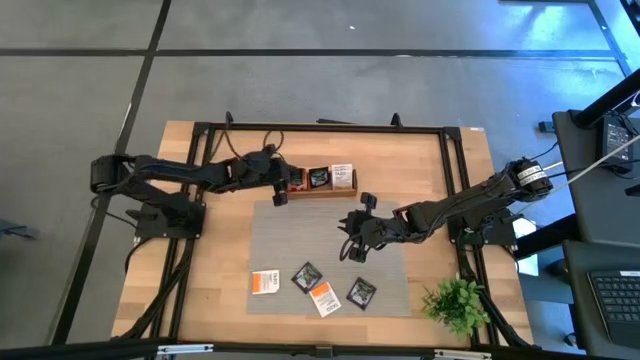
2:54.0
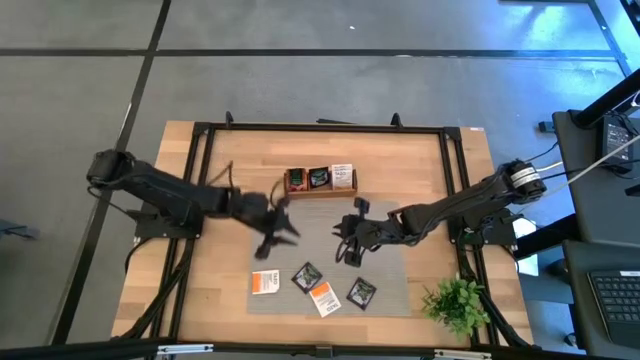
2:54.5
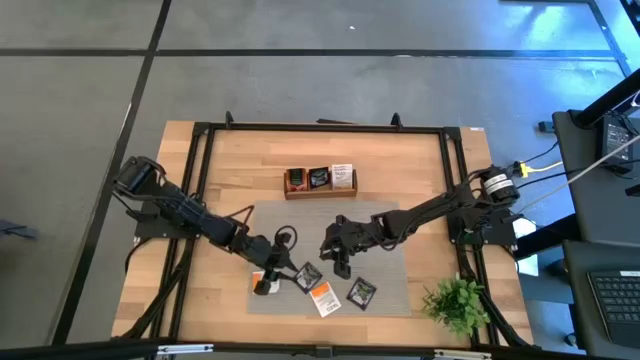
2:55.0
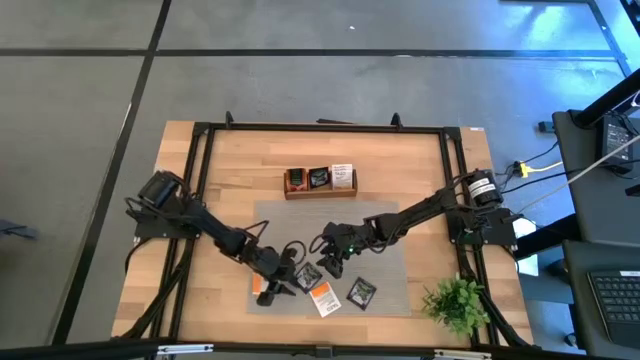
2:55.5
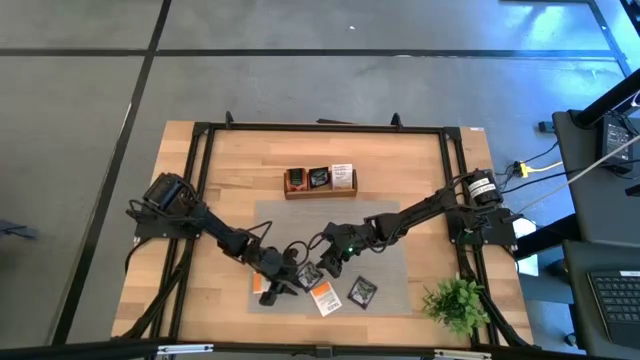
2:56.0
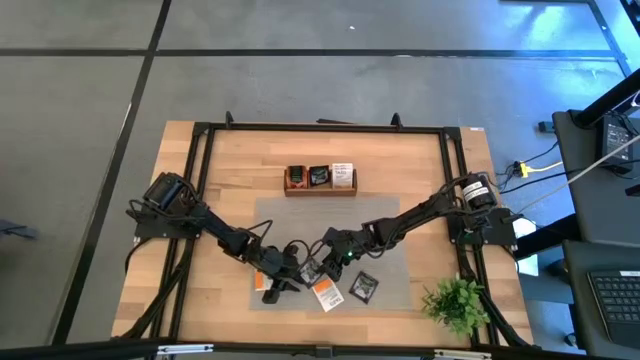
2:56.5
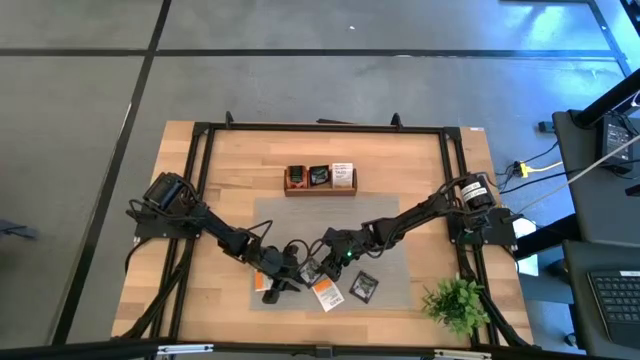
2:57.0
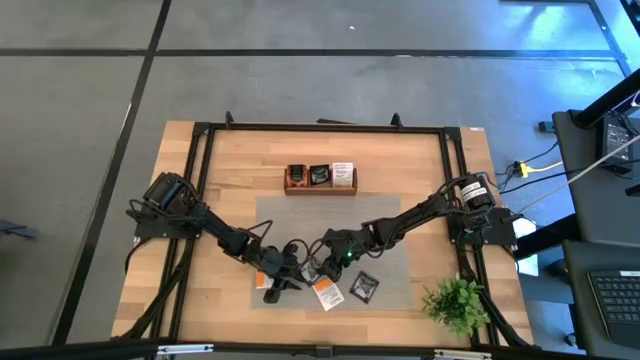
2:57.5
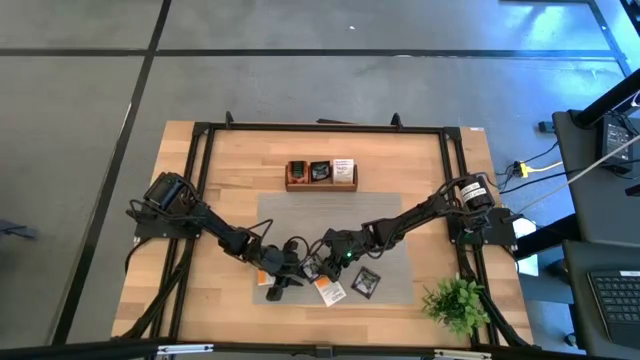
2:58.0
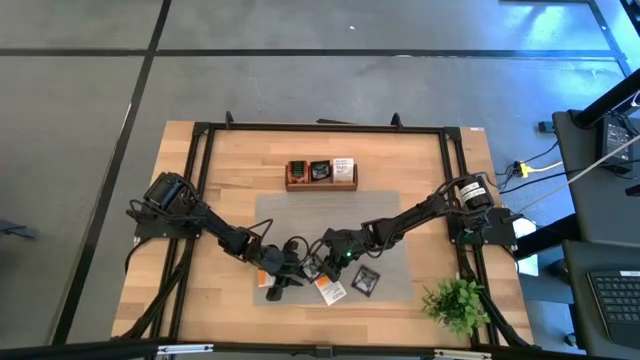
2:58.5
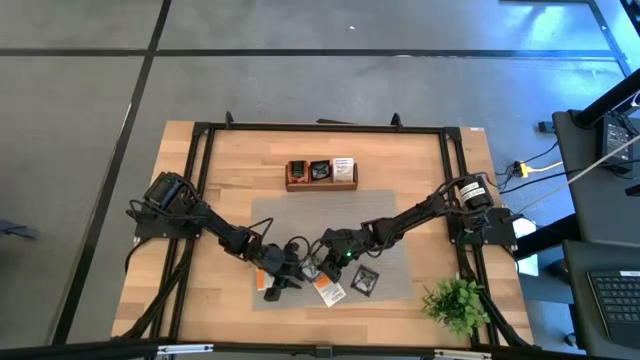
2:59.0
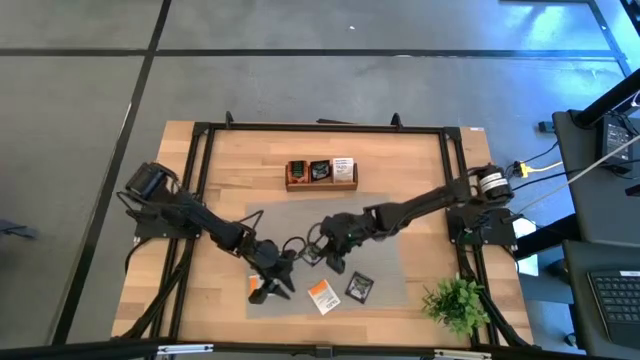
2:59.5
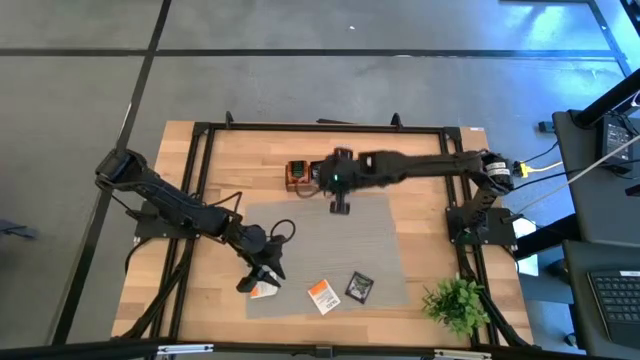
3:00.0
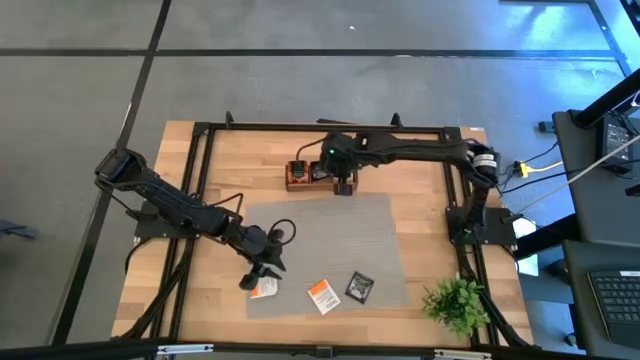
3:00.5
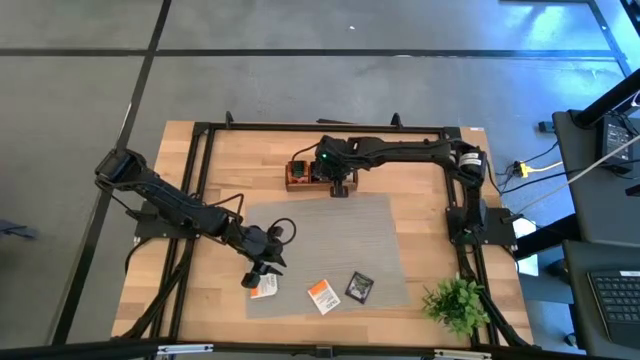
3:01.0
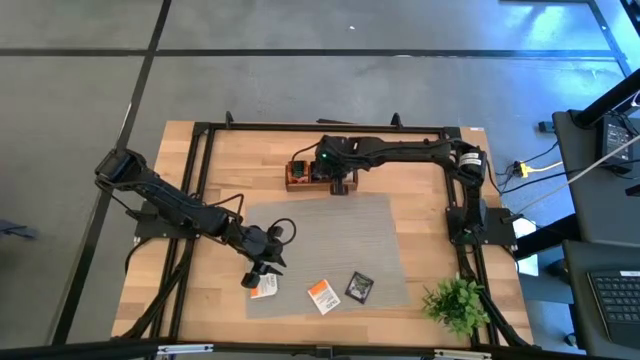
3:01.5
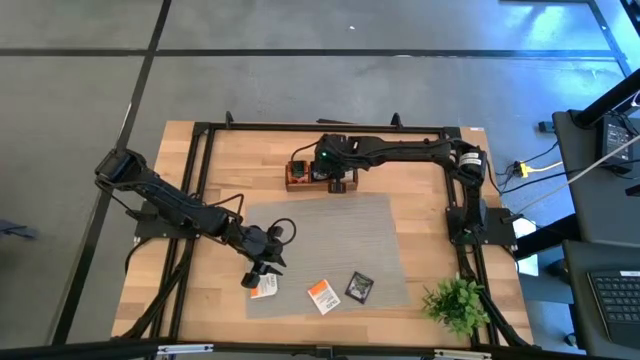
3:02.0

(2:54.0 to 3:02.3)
Task: Pick & Place Tea
Put the purple tea bag into the middle section of the wooden organizer

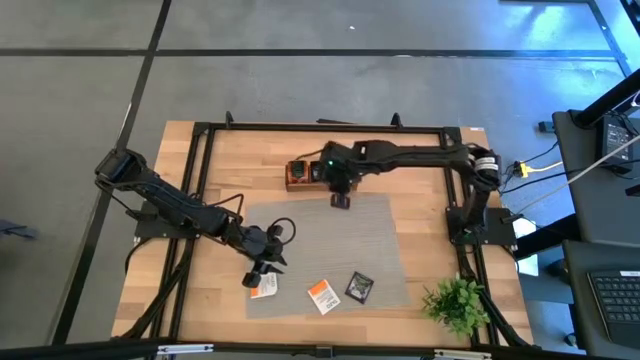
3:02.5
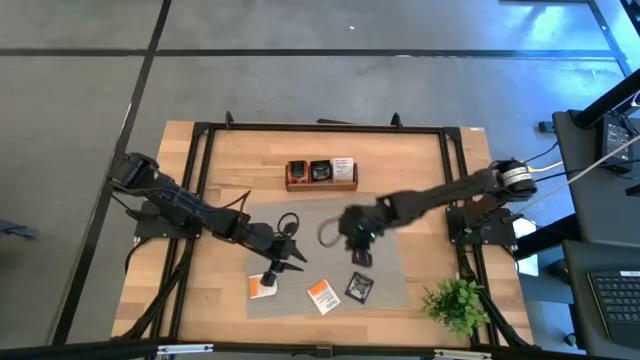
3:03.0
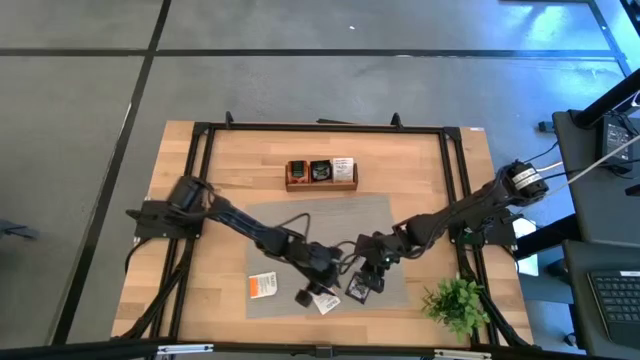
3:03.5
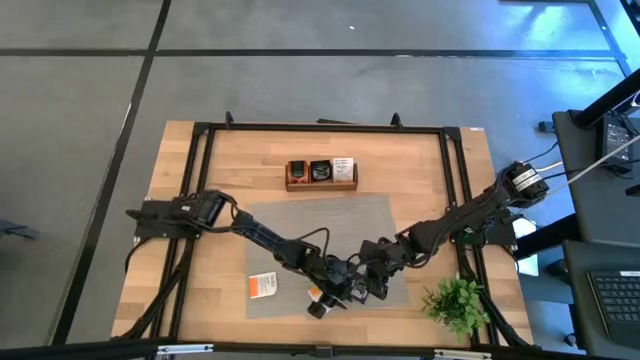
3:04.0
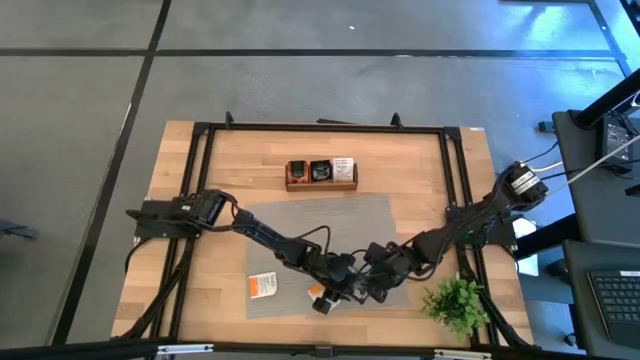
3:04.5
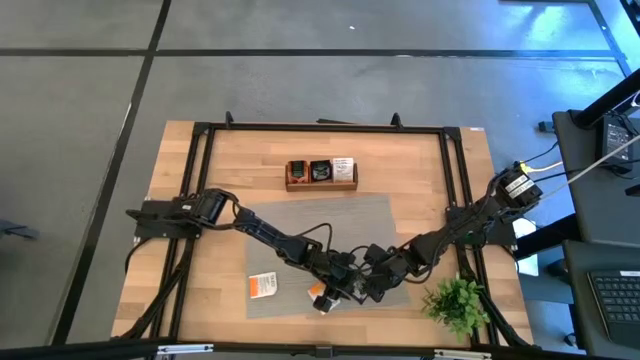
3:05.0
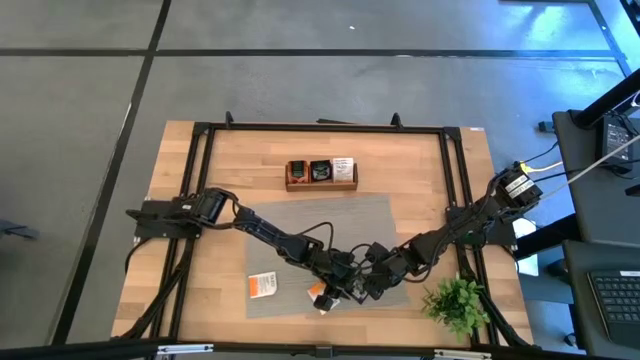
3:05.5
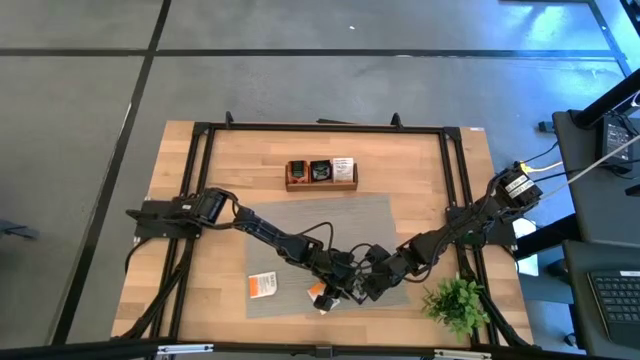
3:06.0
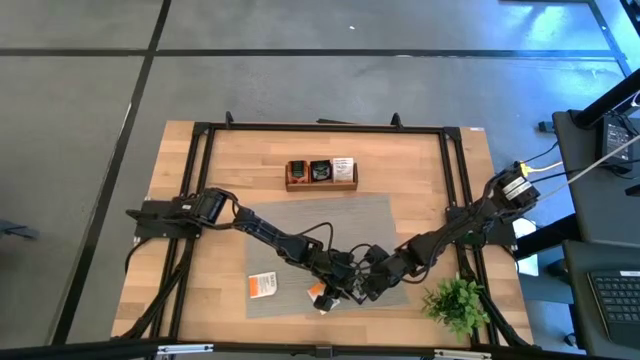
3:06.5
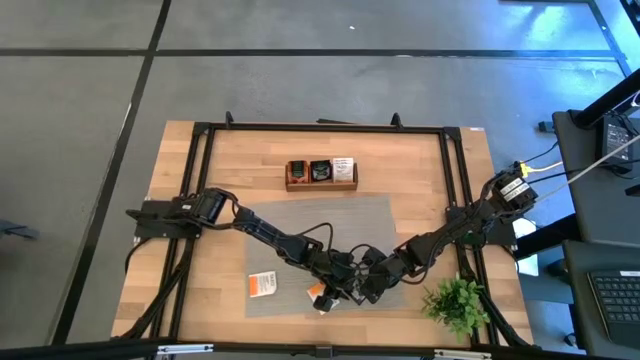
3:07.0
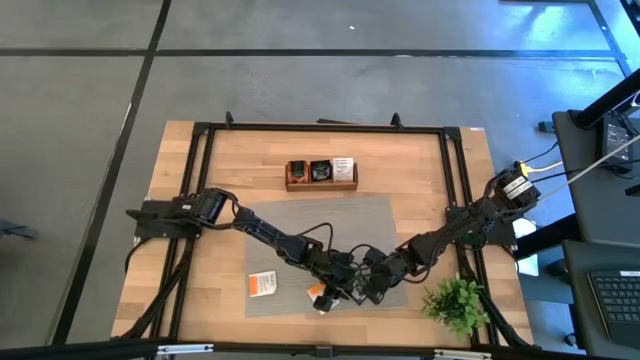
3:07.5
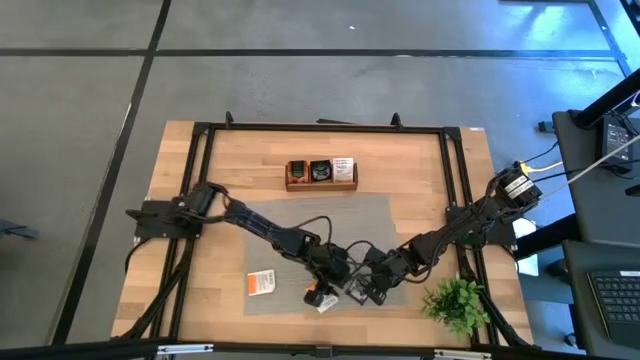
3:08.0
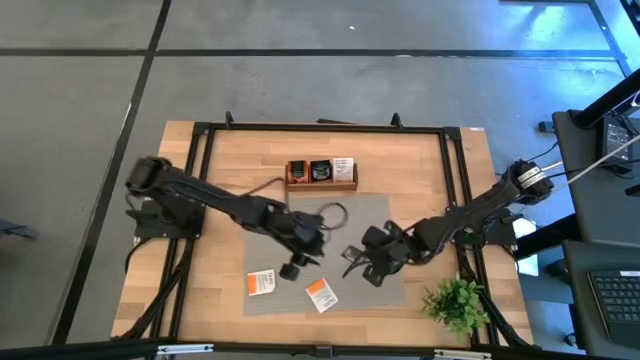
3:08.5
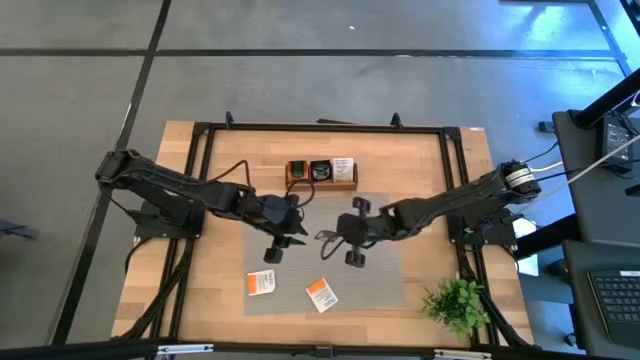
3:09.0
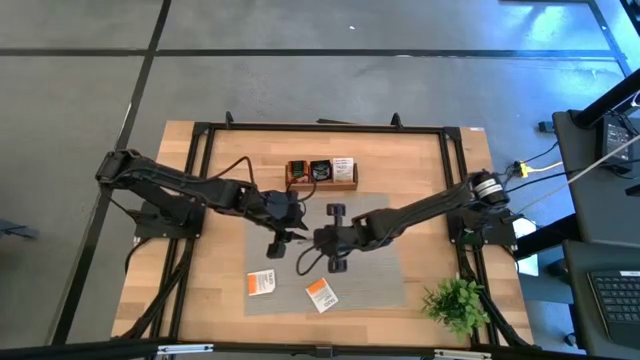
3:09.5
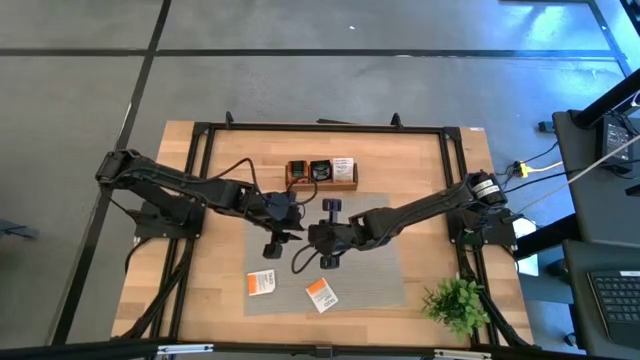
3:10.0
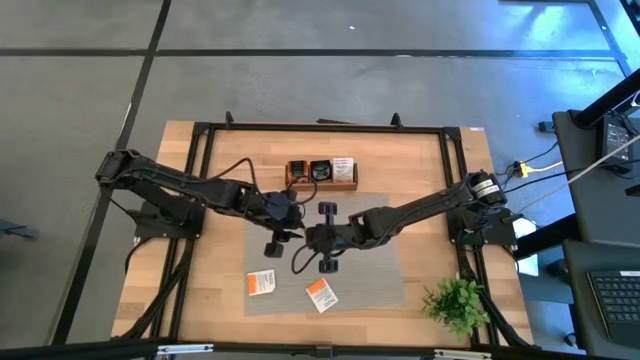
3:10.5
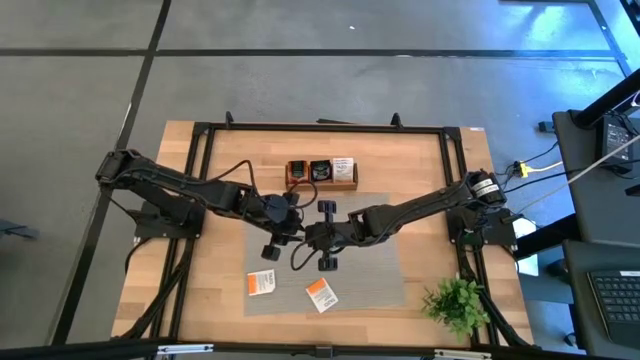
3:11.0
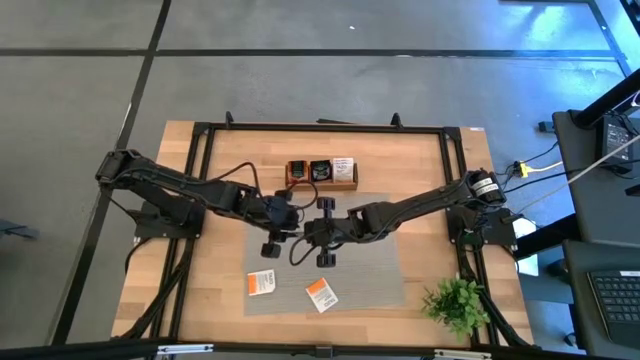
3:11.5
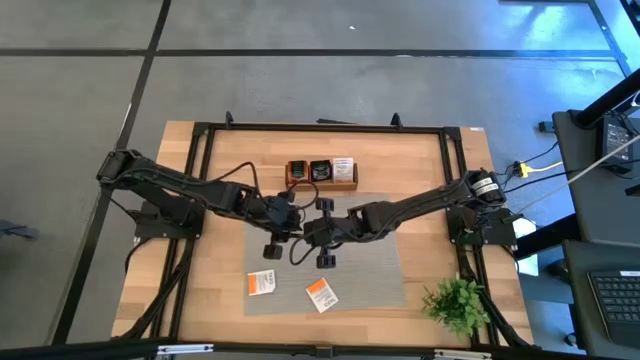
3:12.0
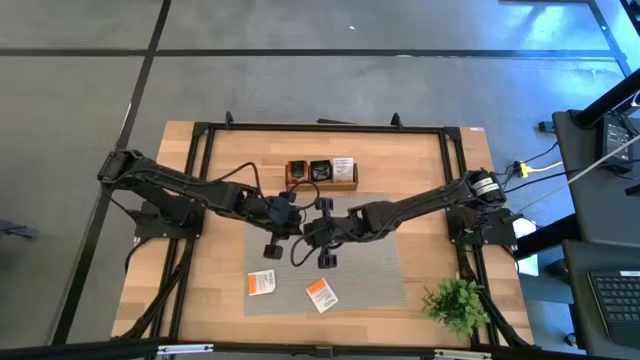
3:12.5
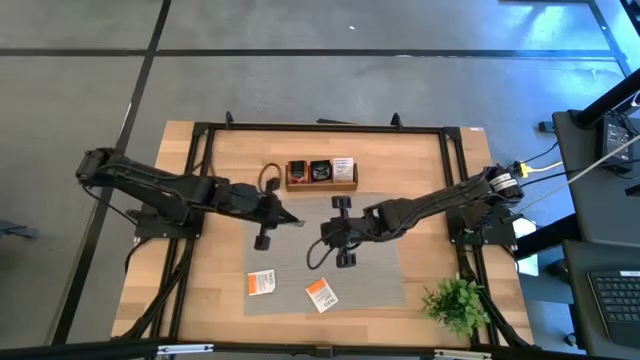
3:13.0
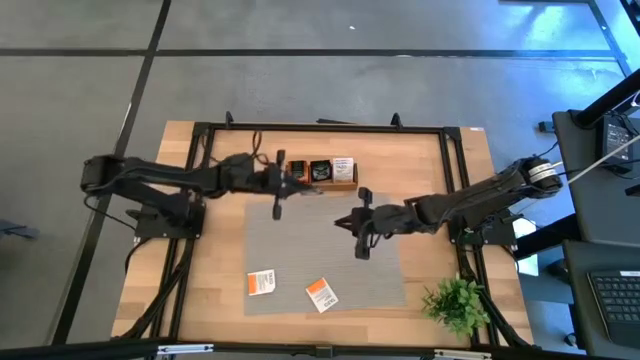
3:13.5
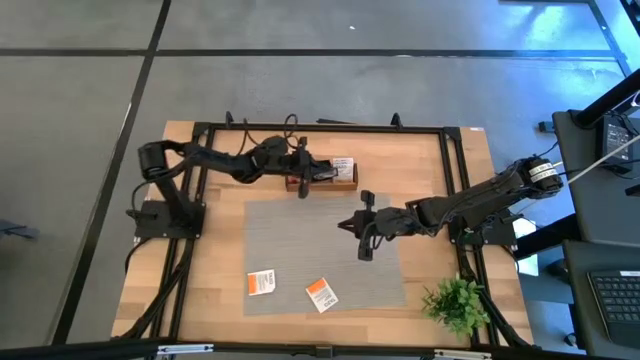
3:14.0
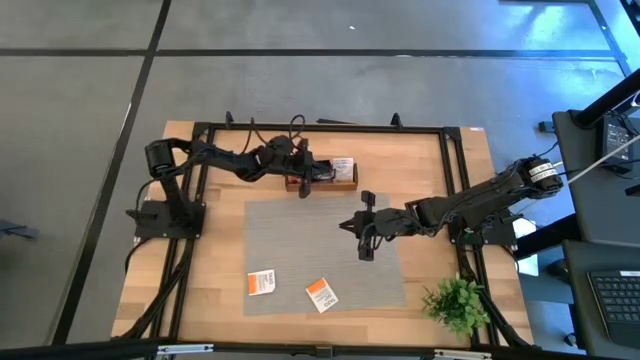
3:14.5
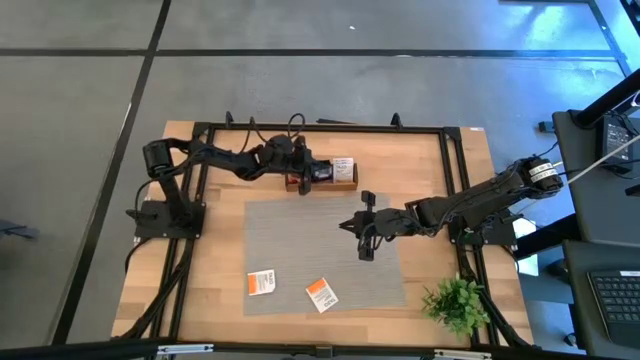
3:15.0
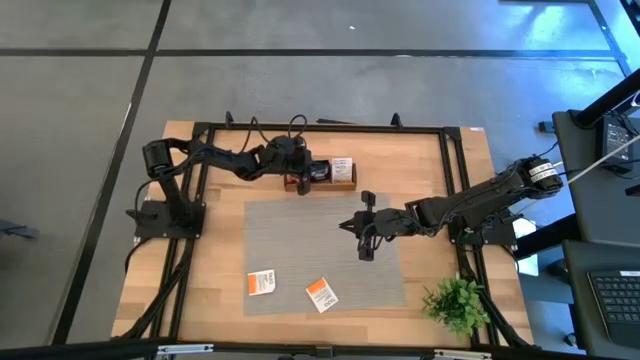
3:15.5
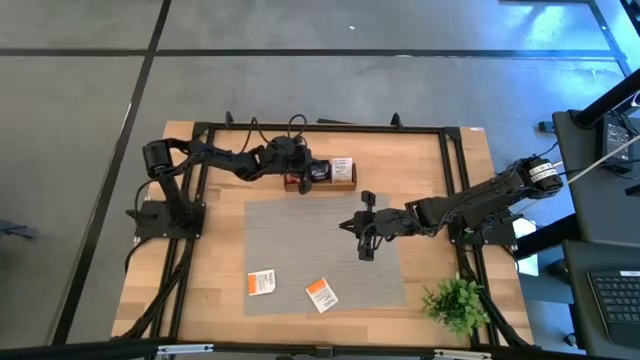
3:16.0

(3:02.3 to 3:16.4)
Put the purple tea bag into the middle section of the wooden organizer
